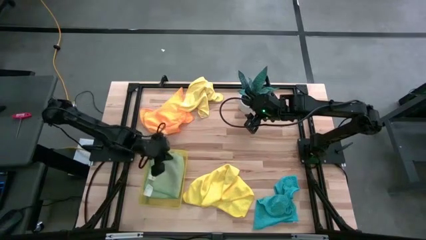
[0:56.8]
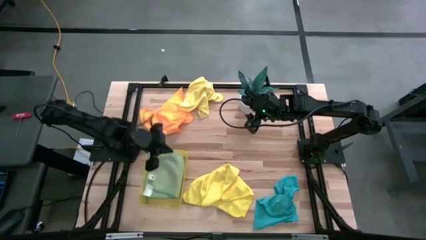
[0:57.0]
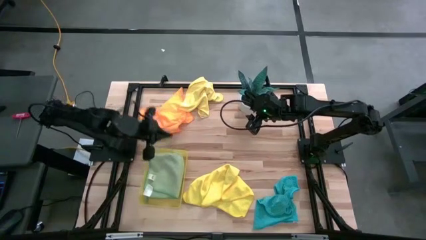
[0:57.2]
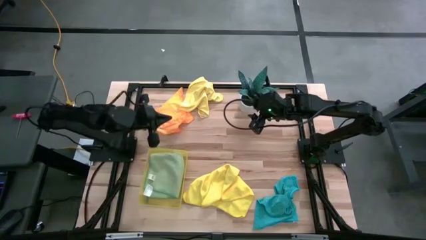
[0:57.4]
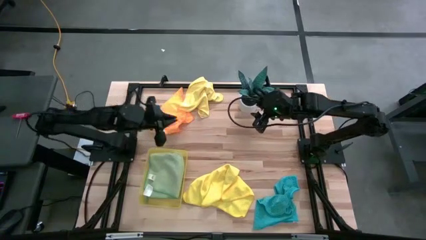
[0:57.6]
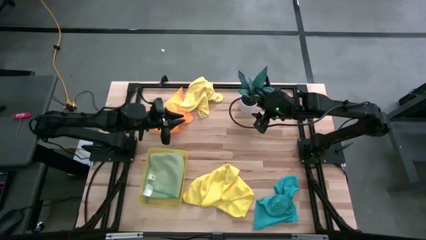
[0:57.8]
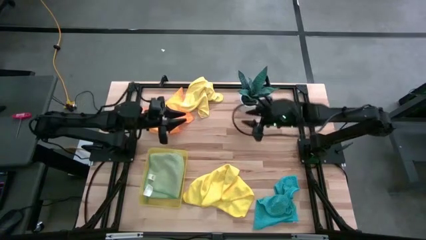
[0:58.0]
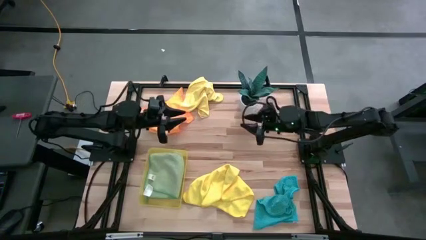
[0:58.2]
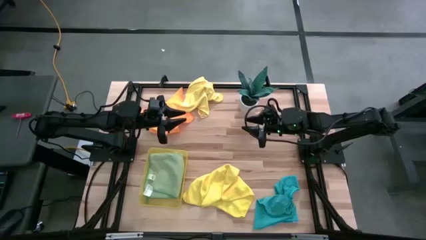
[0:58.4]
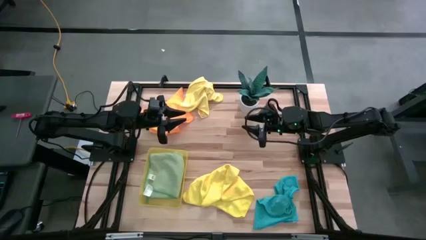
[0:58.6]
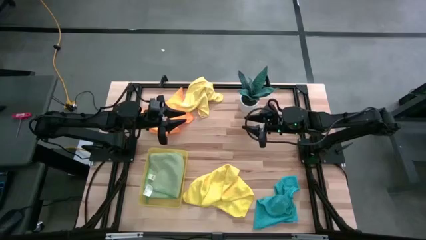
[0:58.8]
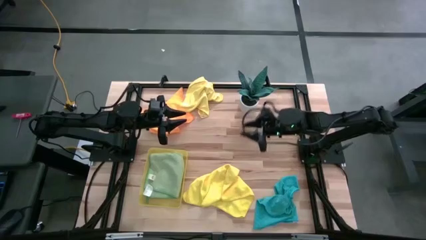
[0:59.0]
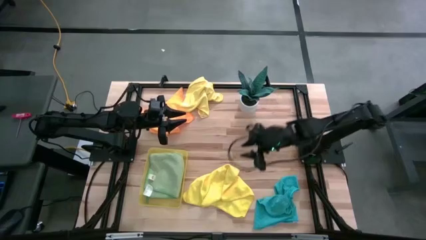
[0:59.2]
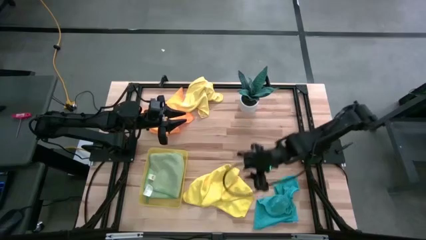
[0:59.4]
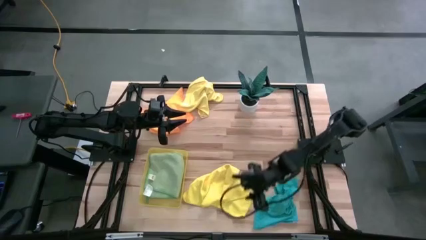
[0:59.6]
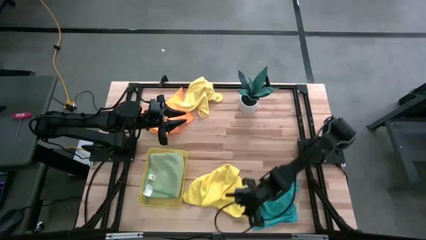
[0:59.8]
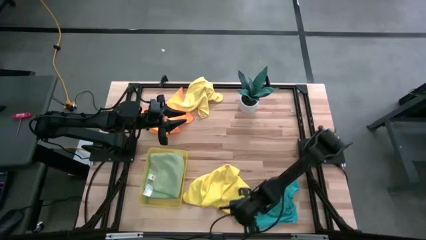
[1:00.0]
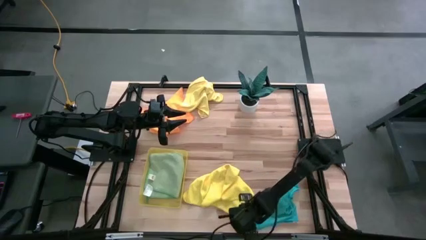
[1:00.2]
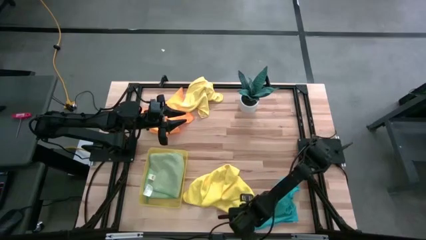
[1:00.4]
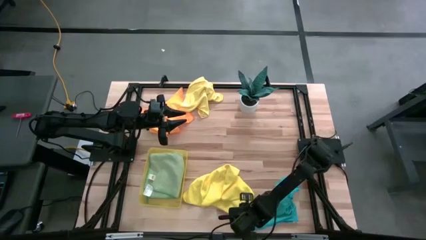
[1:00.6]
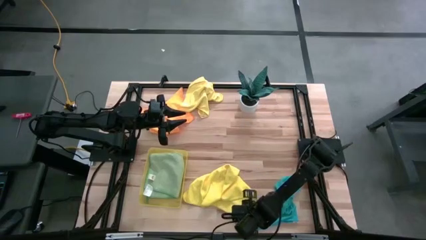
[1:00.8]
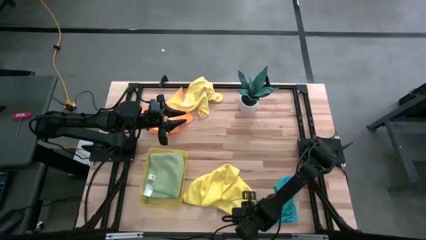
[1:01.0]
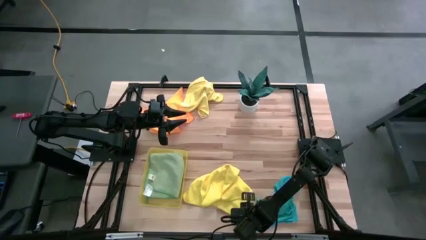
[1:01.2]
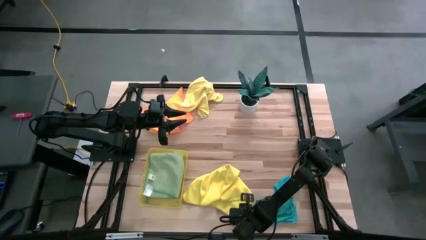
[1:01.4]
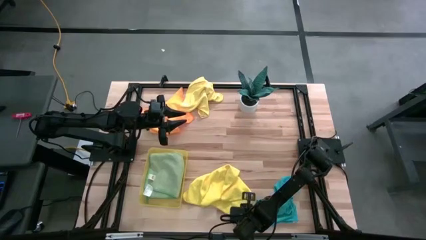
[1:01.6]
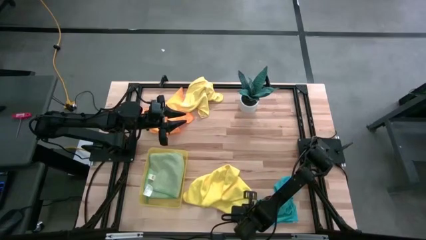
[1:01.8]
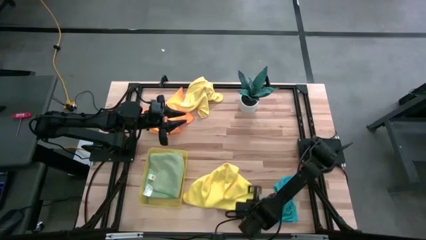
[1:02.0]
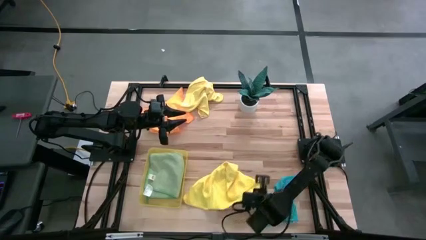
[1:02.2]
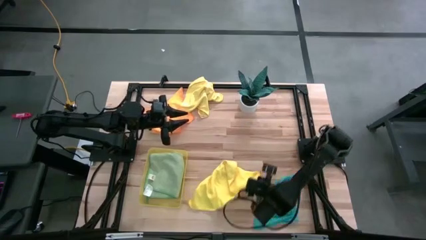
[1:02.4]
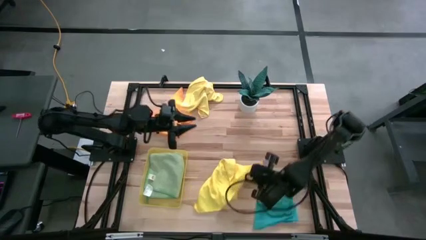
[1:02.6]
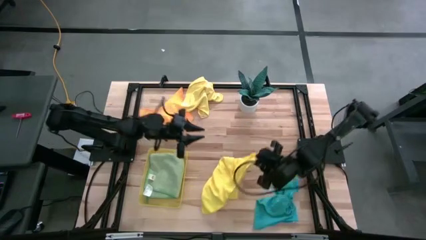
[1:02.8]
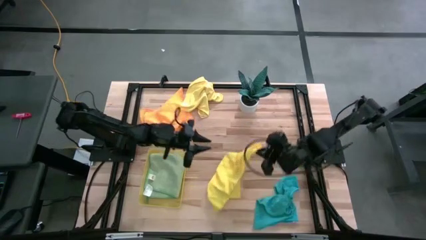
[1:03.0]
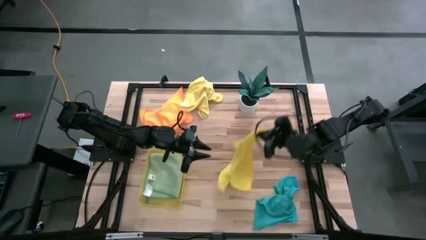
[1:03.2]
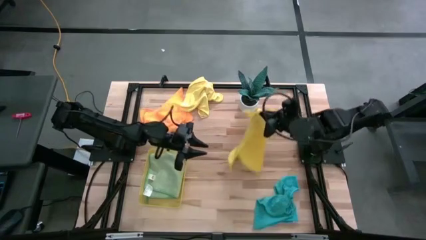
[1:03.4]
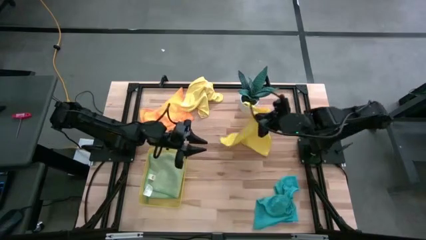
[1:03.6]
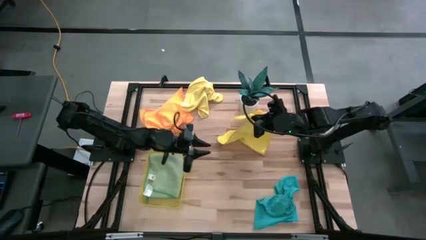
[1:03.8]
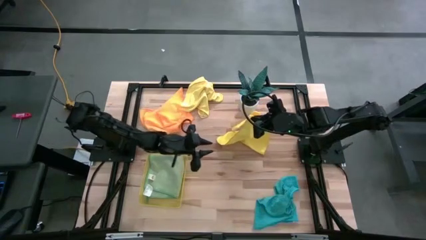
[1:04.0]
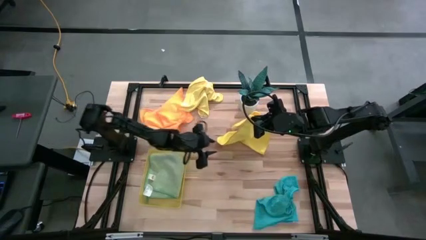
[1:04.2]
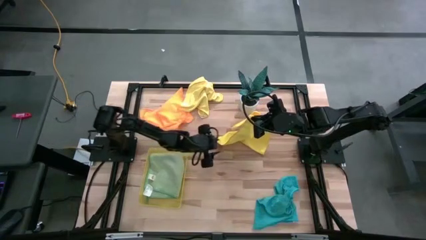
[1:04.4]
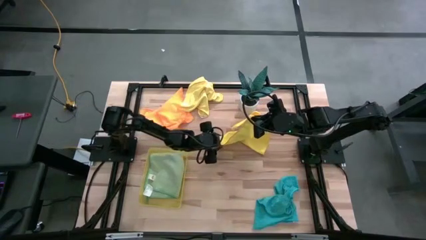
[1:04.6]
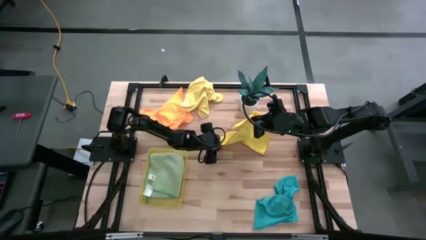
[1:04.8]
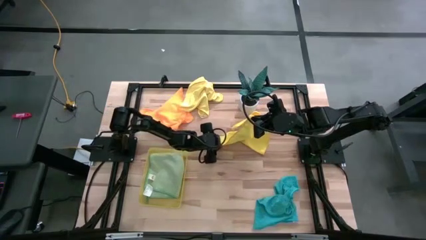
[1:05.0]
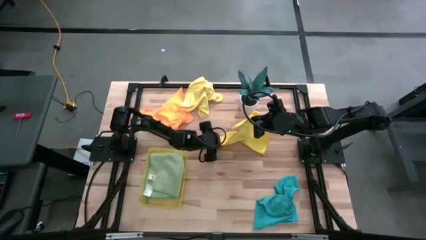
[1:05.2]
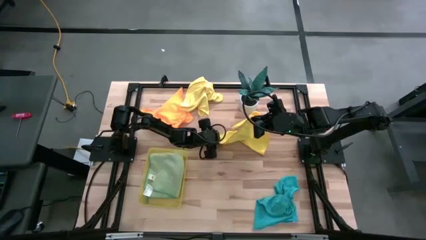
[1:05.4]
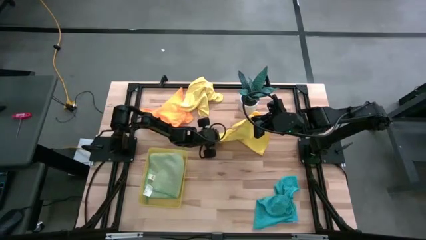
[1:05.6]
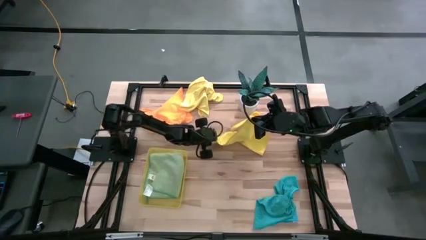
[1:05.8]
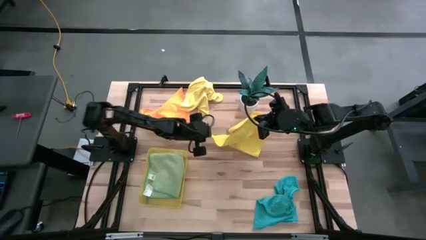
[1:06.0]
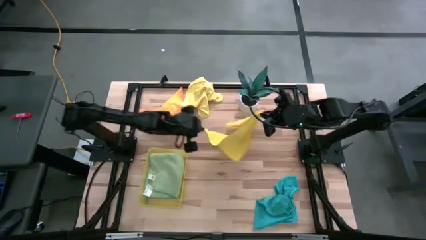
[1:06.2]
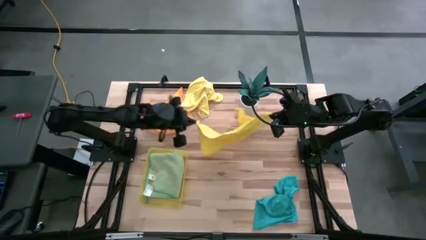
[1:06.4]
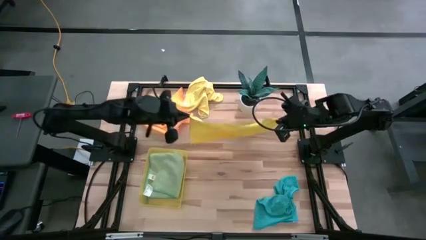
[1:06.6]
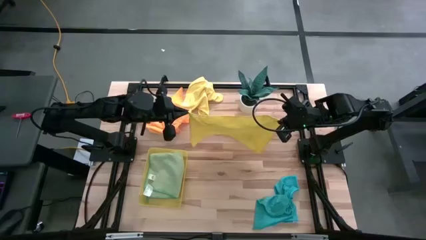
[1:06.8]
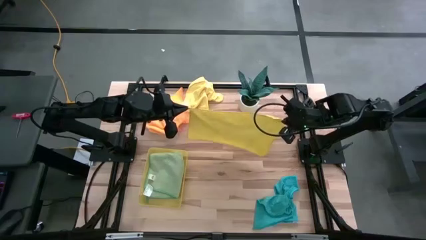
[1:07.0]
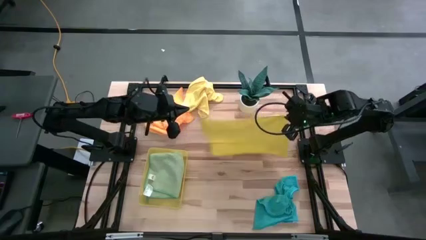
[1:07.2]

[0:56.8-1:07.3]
Task: Fold microfiber towels
Fold the bottom yellow microfiber cloth
